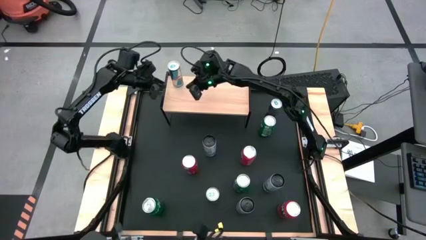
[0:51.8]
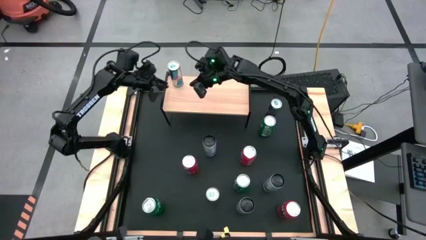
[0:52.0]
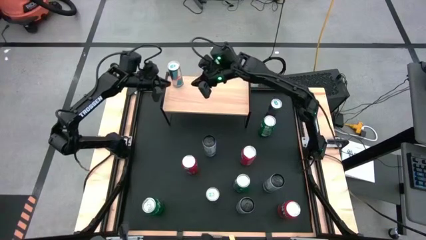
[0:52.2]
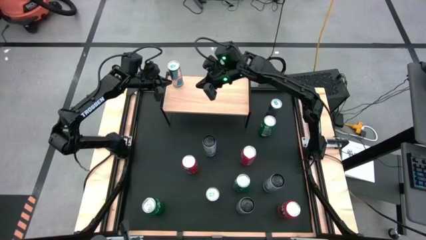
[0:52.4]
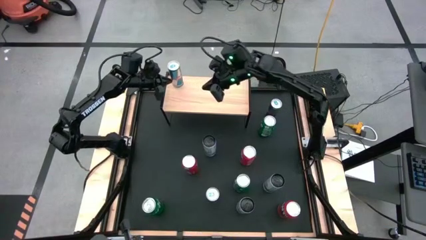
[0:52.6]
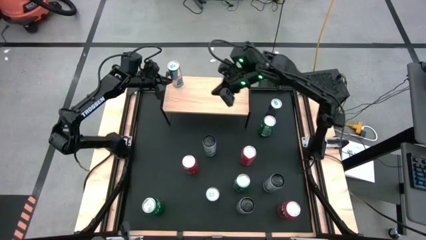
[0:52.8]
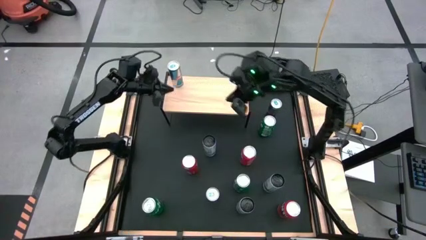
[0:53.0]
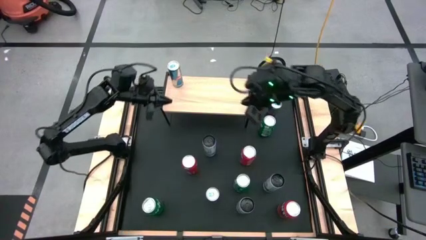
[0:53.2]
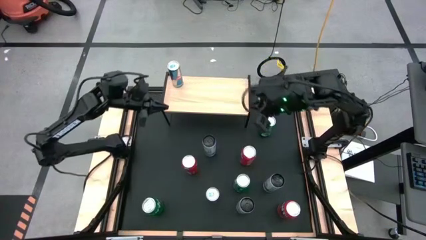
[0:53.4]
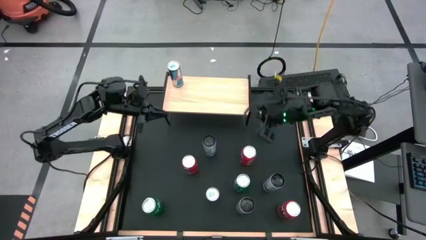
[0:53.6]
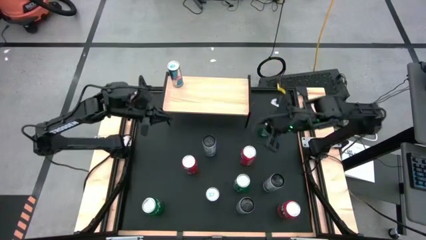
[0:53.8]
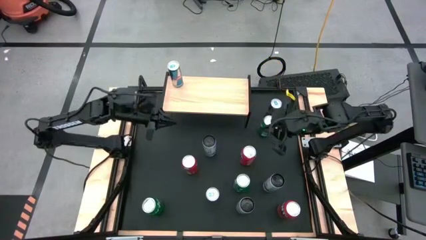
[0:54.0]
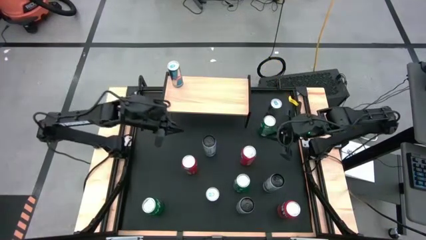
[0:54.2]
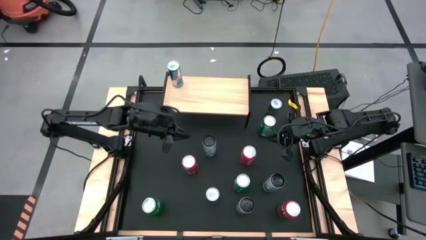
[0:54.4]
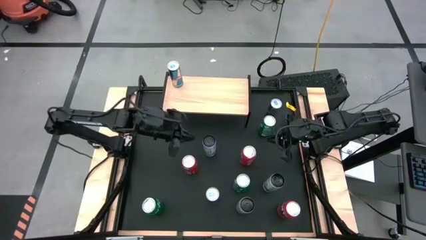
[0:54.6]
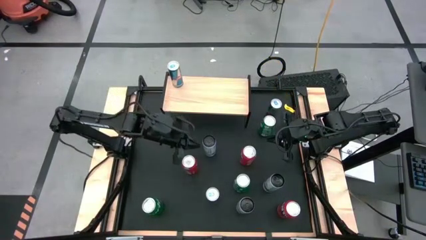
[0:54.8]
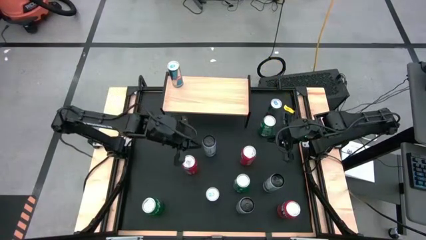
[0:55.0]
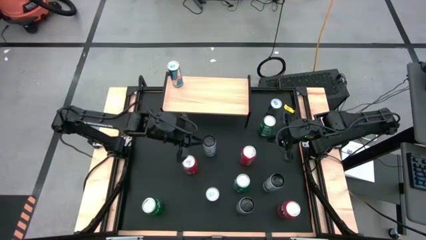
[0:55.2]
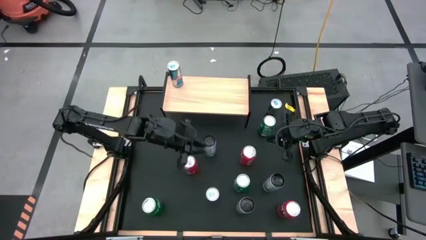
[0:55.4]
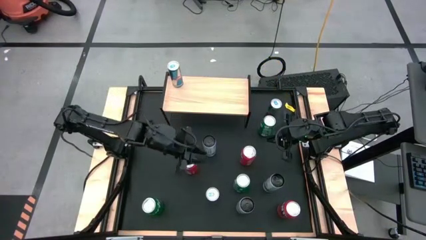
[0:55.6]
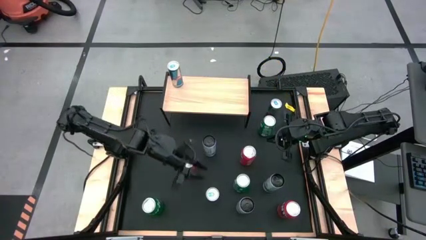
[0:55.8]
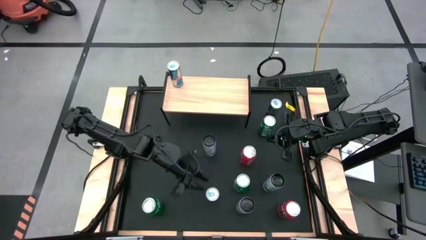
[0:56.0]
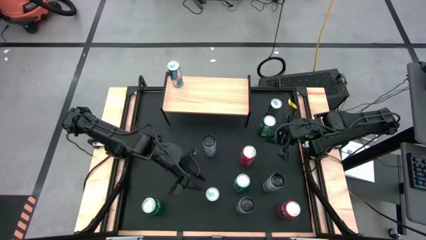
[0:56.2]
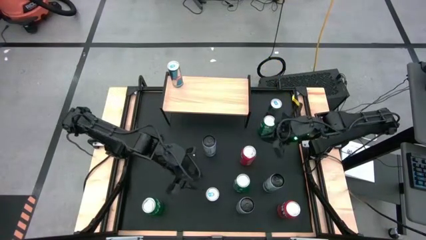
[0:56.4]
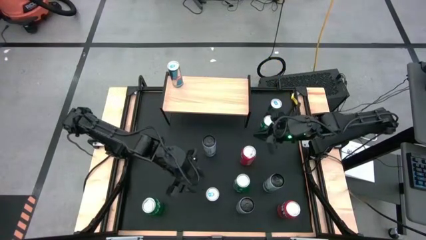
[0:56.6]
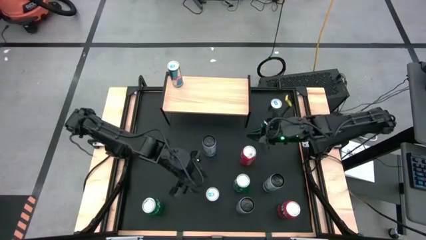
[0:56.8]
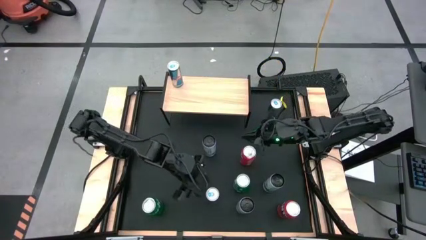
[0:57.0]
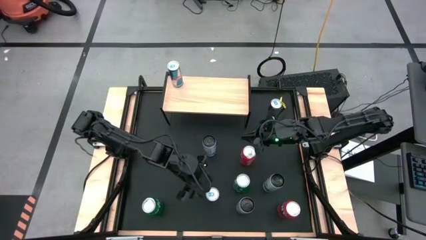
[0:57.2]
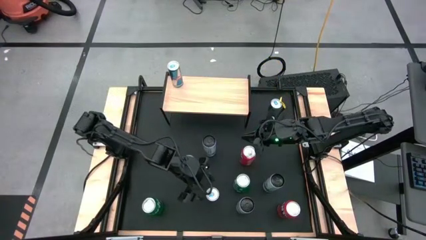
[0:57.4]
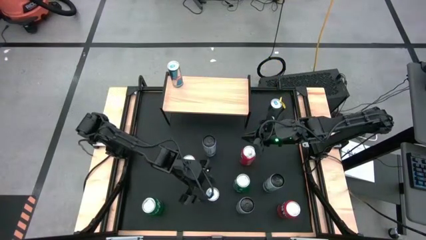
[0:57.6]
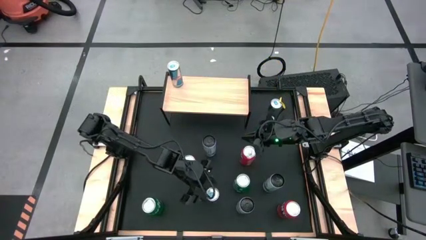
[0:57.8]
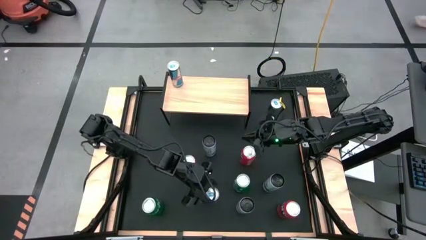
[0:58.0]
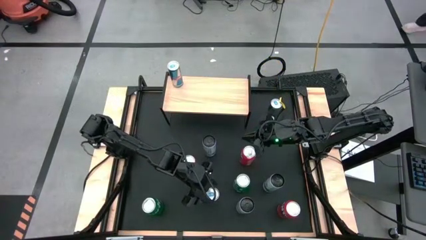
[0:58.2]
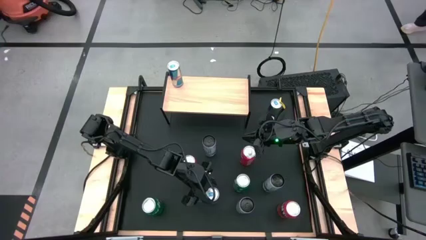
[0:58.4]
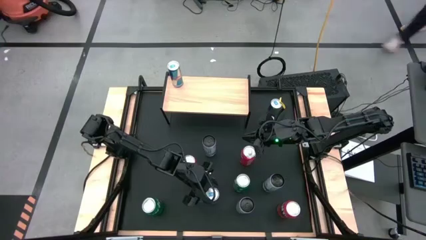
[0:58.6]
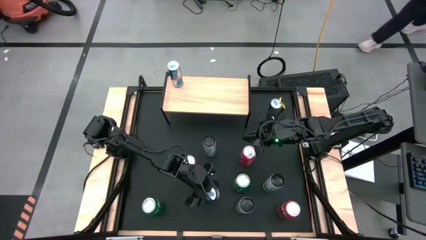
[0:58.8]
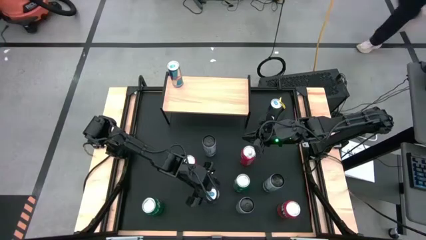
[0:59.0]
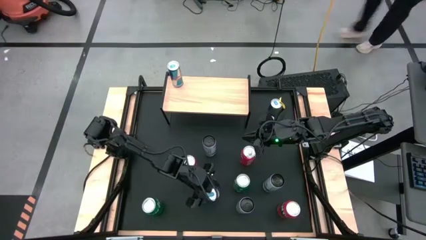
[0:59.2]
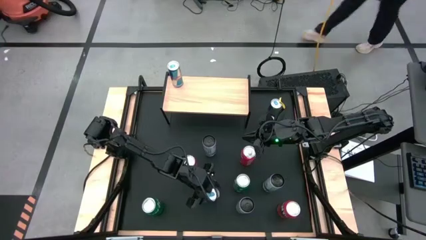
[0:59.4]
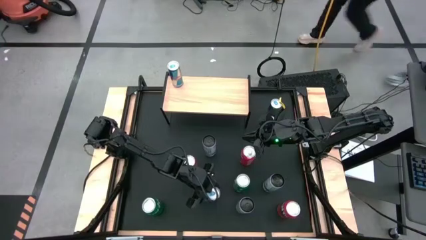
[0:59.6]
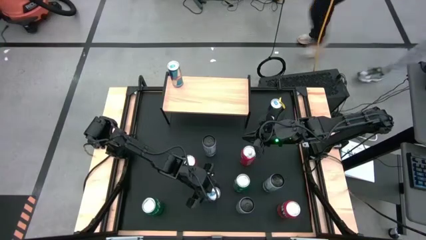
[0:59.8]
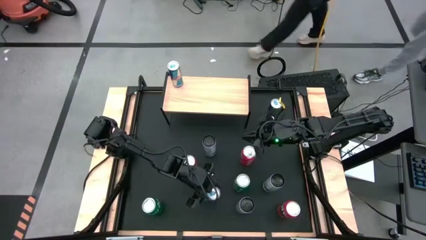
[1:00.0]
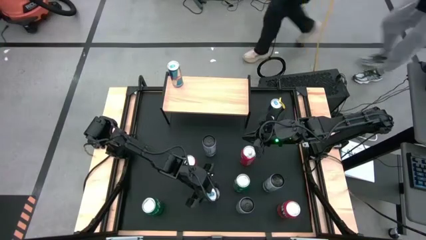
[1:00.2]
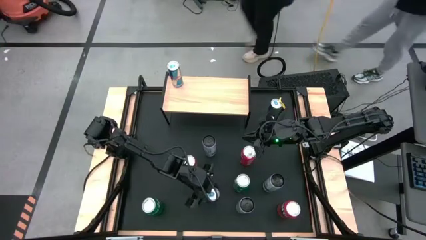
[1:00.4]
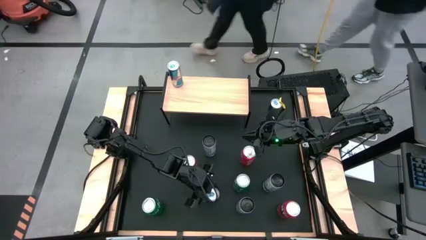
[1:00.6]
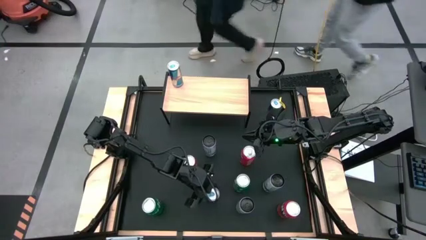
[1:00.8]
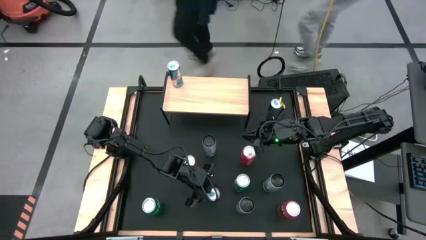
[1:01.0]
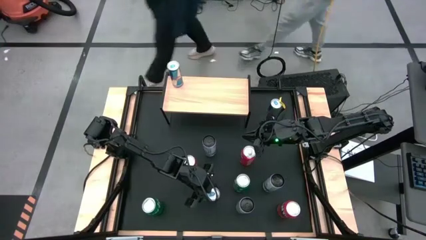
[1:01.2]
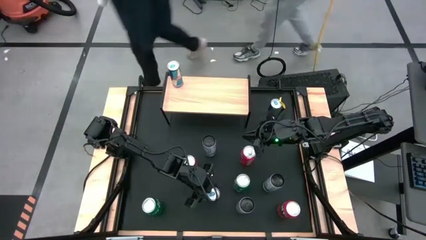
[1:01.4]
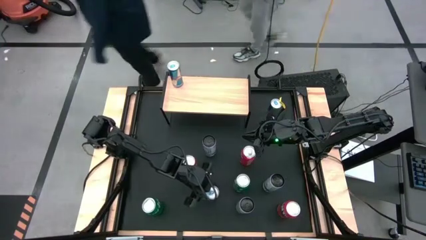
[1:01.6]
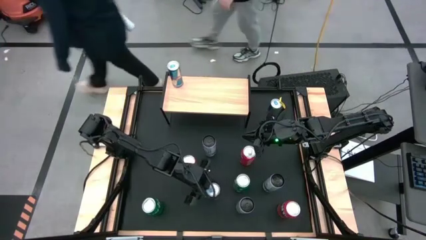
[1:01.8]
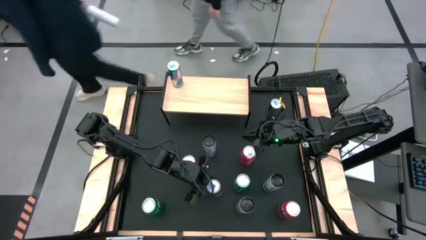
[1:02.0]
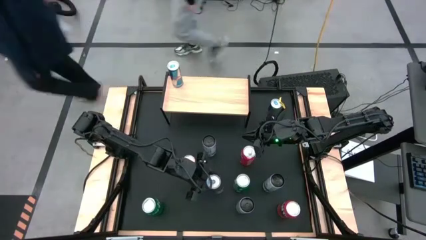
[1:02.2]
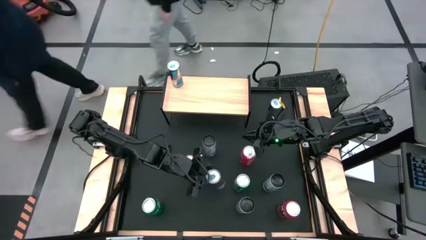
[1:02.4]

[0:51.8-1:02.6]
Task: Place canned beverage on shelf
Put the bottom blue soda can on the shelf

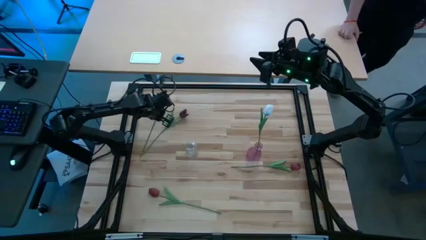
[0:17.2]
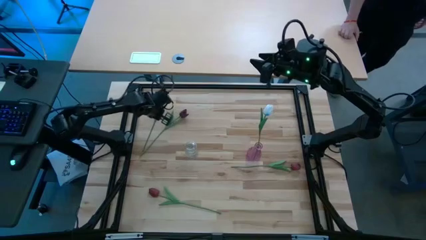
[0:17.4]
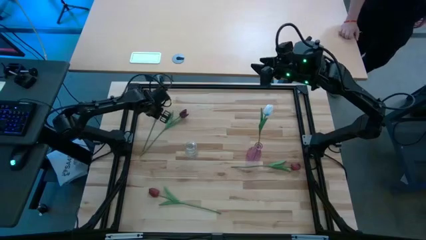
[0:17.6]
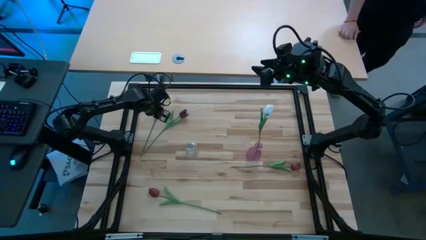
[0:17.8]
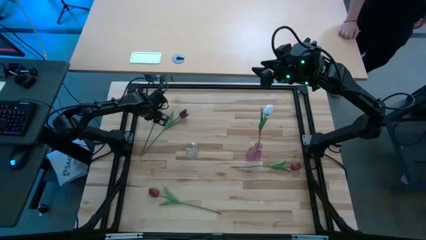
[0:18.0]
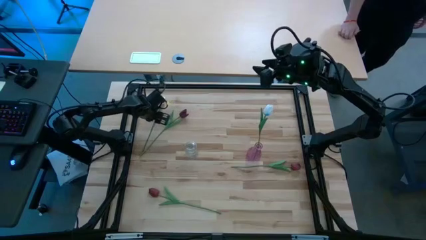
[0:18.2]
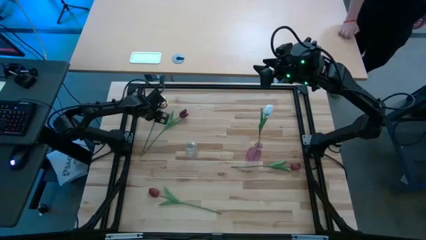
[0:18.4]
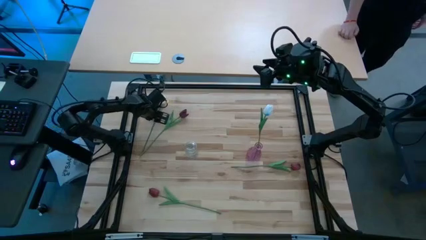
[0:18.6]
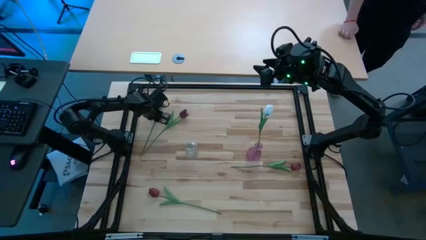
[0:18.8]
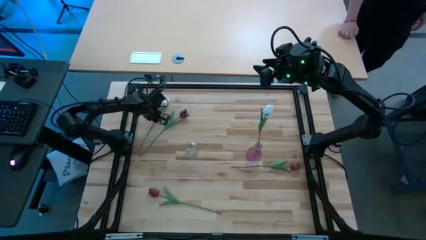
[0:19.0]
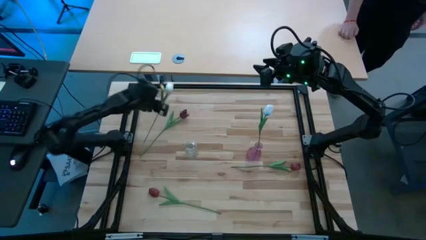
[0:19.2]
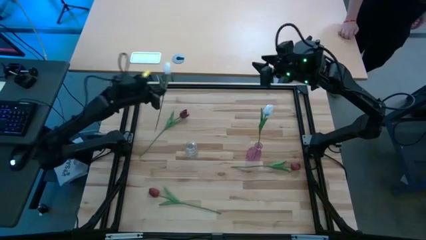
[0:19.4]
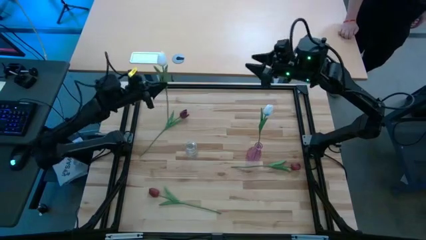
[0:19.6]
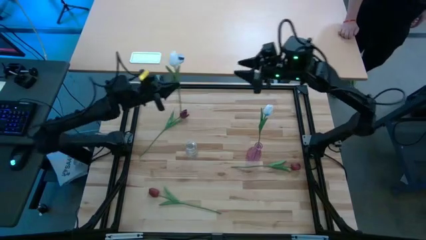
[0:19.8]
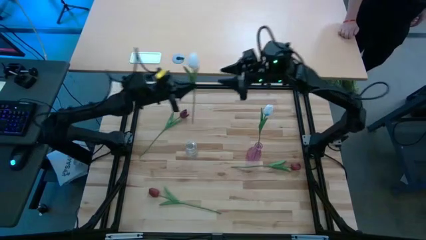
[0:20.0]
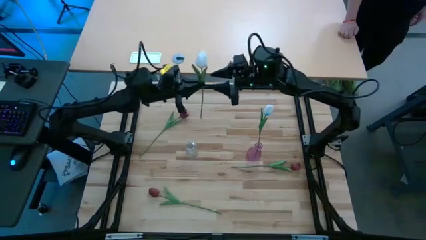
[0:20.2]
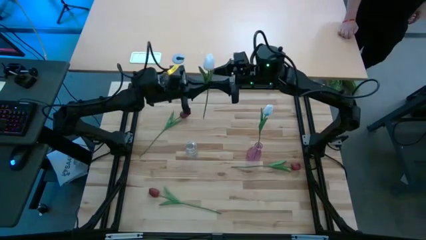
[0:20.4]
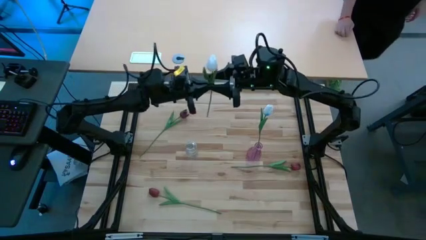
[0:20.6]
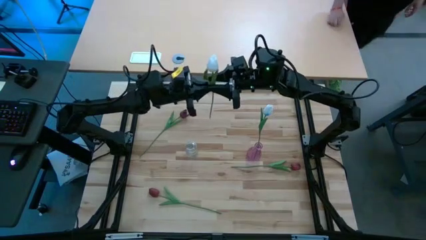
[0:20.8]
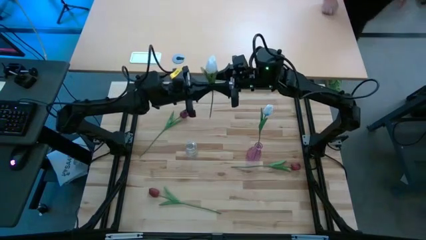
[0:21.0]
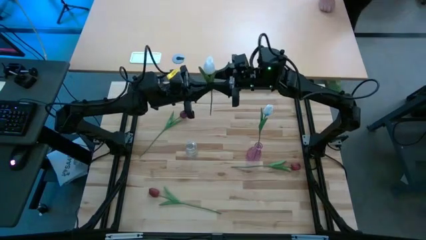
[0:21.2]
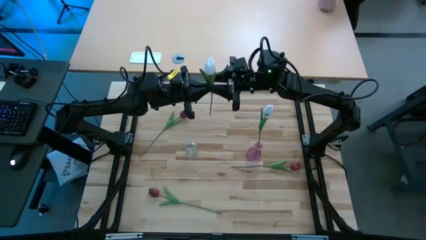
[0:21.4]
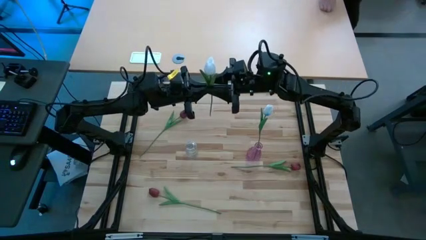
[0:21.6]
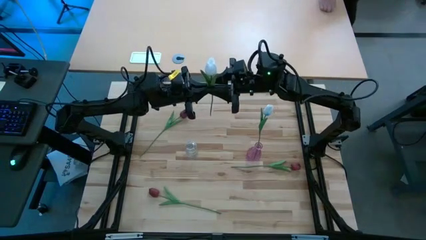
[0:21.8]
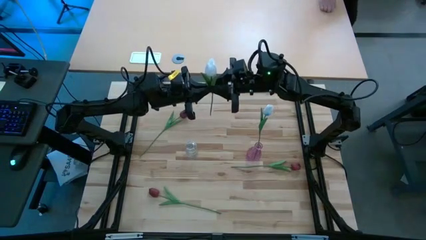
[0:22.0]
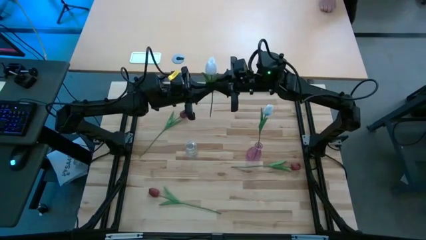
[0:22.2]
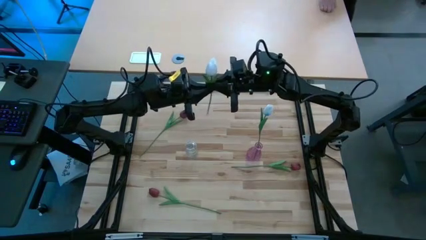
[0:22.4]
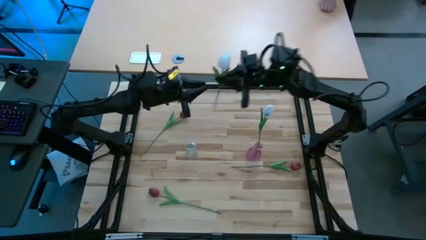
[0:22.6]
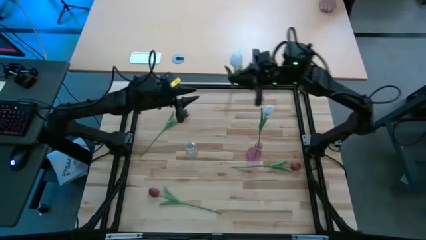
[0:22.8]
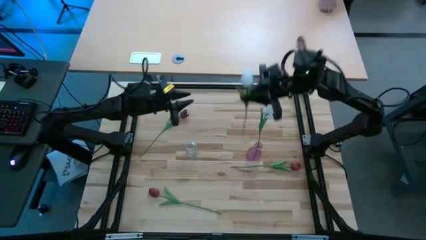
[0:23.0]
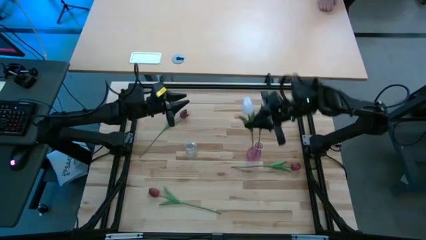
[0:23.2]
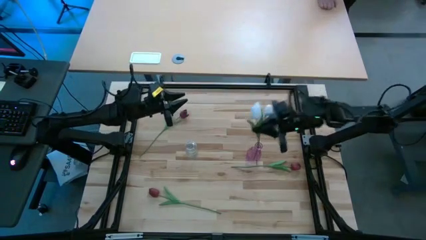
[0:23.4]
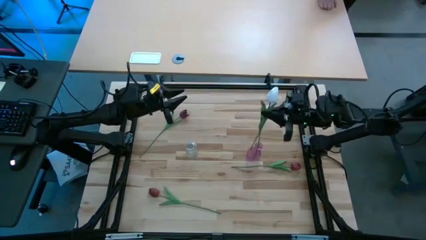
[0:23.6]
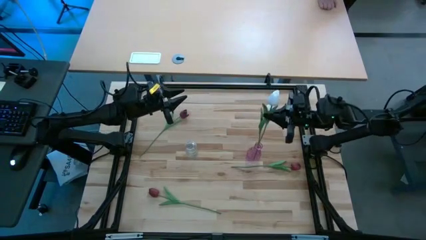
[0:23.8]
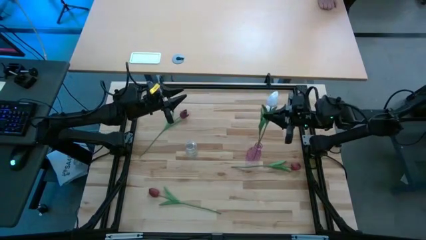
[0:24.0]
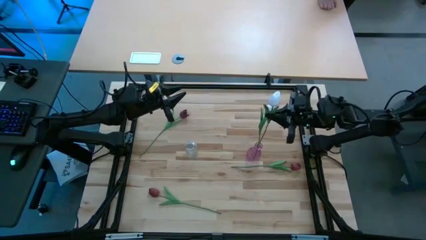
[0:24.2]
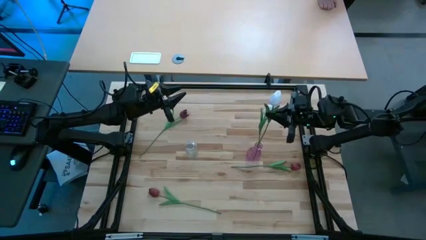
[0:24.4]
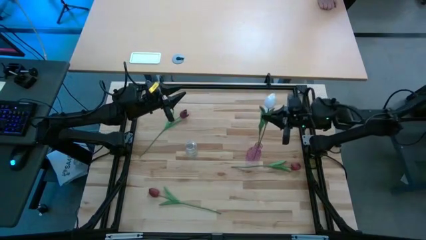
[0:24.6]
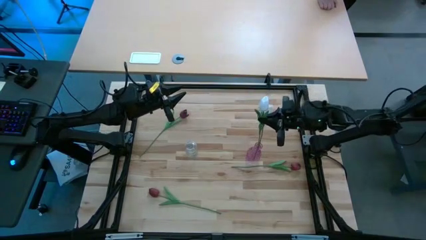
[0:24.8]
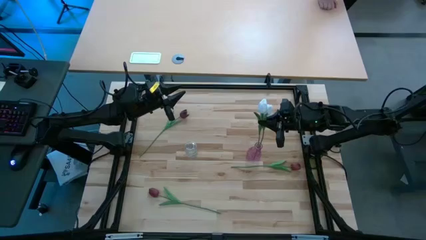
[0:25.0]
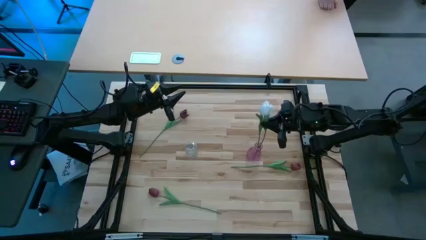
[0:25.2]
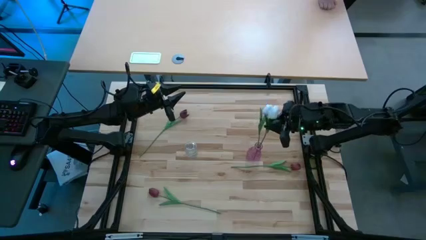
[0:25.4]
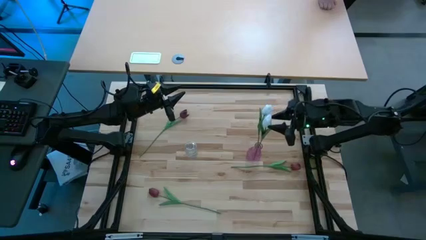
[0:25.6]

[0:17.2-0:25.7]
Task: Sort flowers into vase by color
Put the white flower into the purple vase
